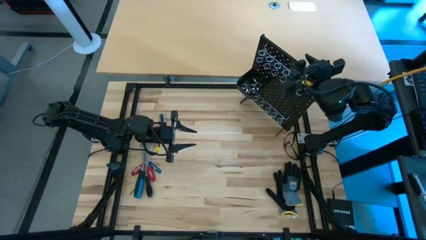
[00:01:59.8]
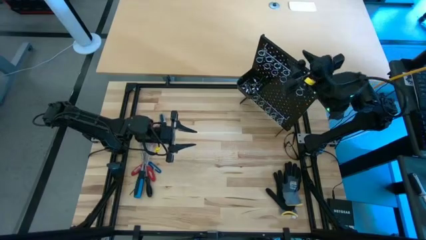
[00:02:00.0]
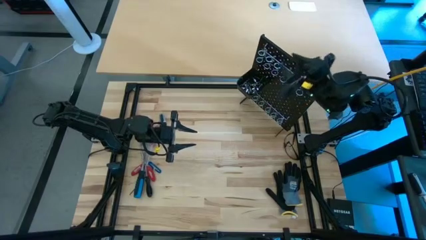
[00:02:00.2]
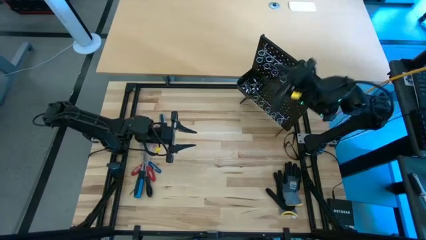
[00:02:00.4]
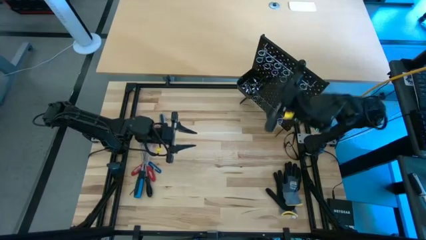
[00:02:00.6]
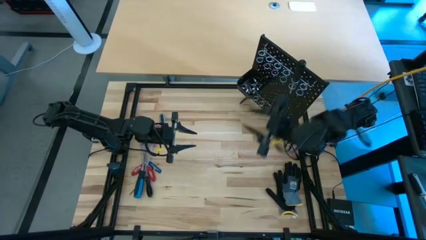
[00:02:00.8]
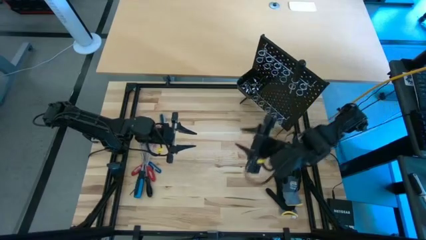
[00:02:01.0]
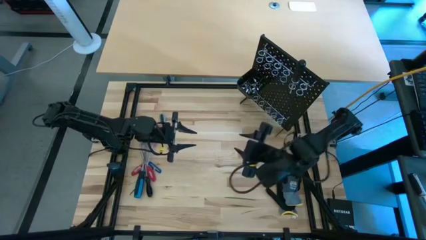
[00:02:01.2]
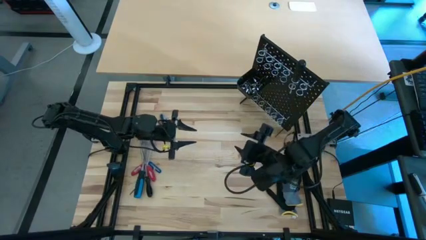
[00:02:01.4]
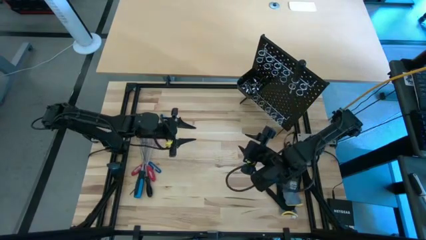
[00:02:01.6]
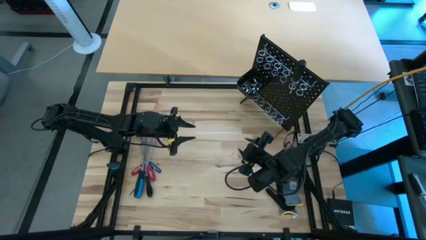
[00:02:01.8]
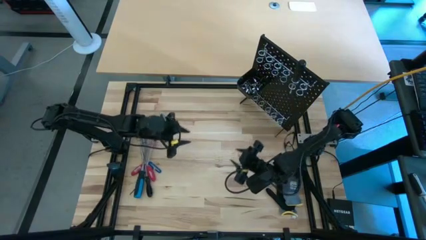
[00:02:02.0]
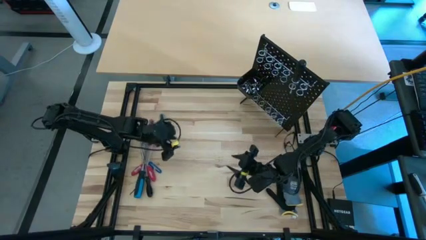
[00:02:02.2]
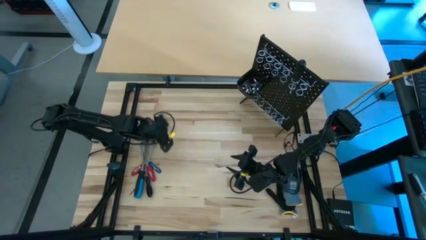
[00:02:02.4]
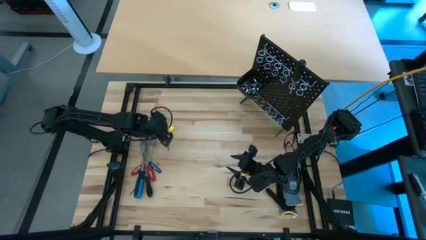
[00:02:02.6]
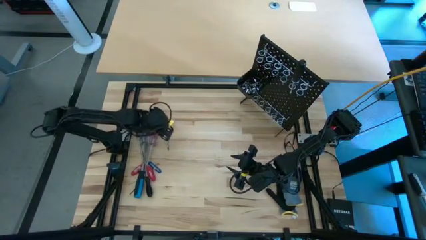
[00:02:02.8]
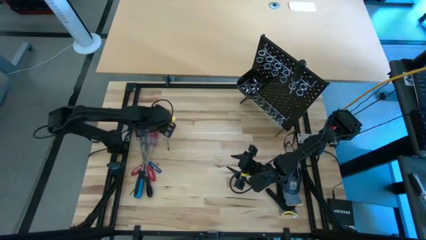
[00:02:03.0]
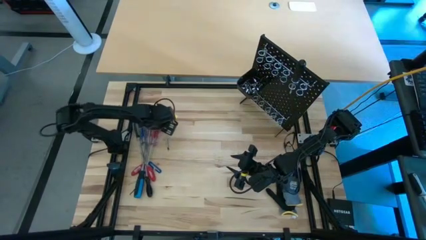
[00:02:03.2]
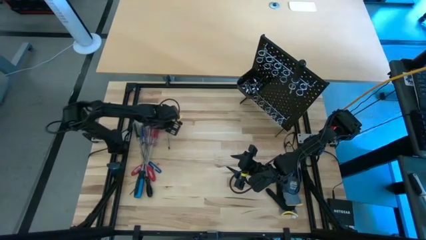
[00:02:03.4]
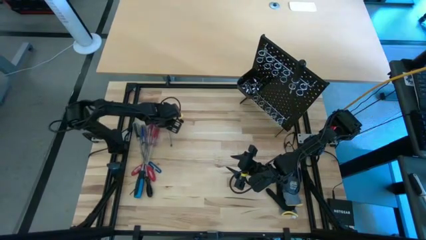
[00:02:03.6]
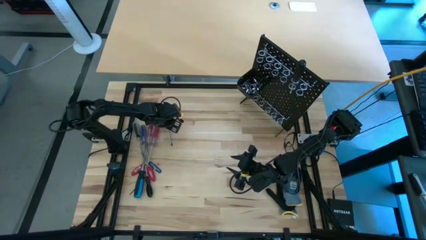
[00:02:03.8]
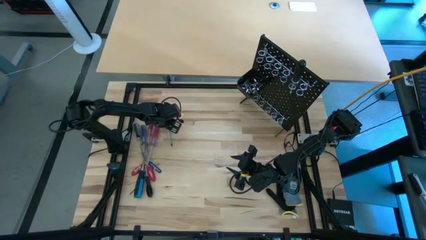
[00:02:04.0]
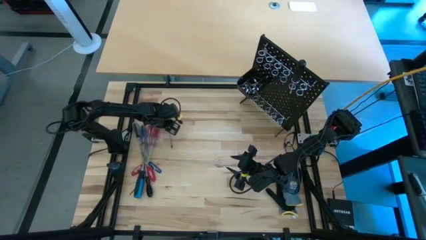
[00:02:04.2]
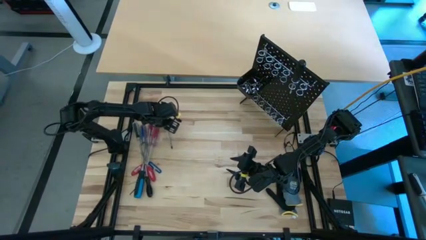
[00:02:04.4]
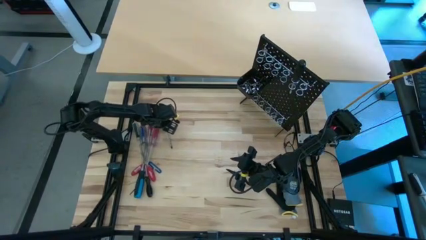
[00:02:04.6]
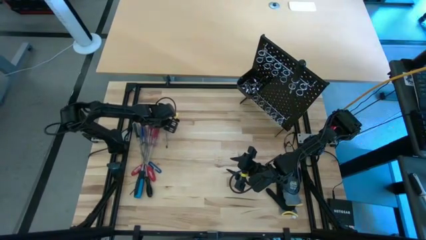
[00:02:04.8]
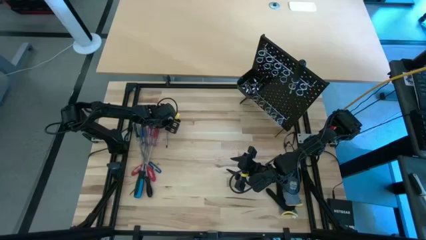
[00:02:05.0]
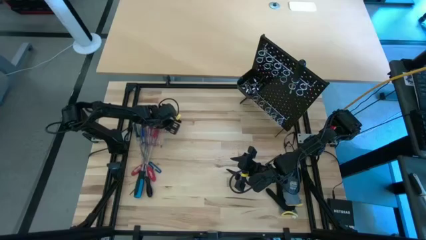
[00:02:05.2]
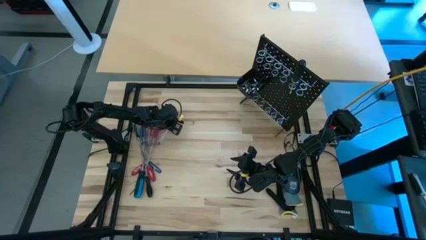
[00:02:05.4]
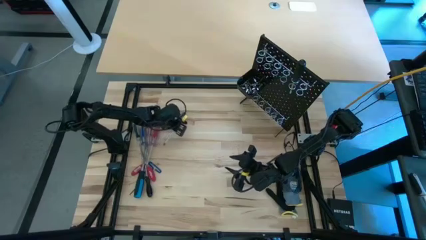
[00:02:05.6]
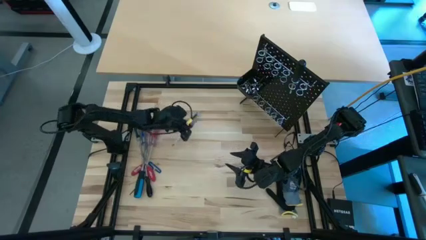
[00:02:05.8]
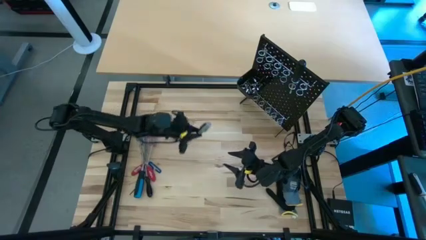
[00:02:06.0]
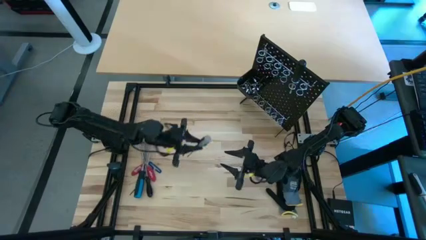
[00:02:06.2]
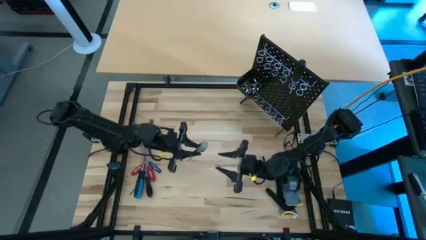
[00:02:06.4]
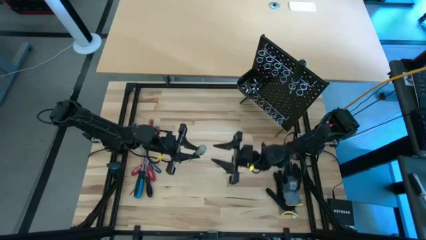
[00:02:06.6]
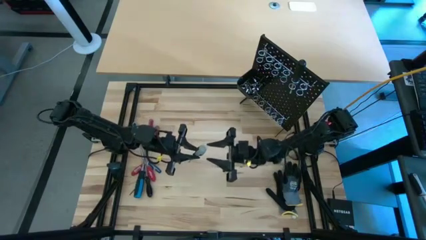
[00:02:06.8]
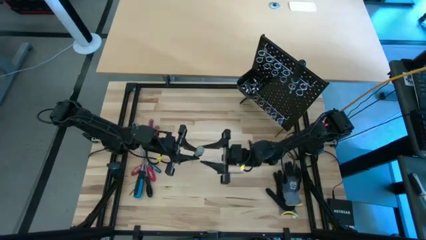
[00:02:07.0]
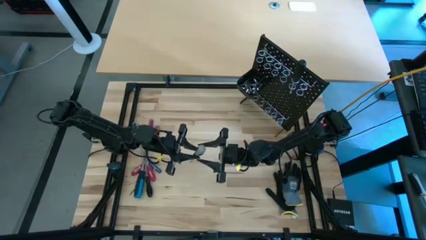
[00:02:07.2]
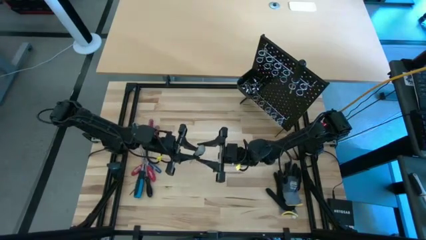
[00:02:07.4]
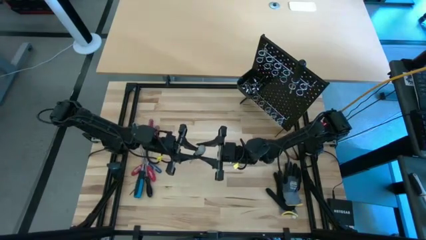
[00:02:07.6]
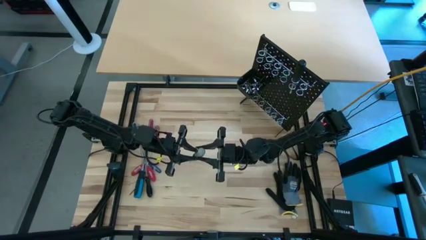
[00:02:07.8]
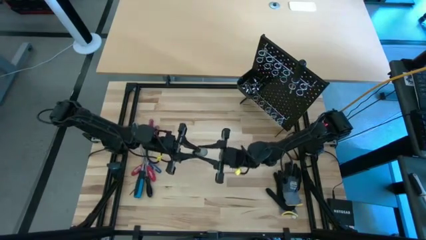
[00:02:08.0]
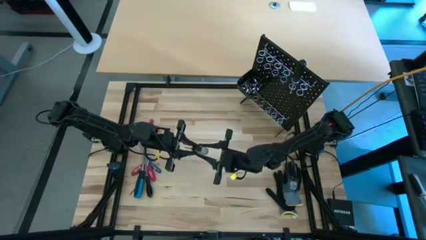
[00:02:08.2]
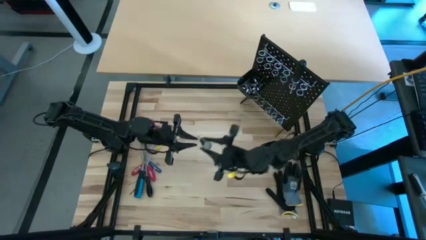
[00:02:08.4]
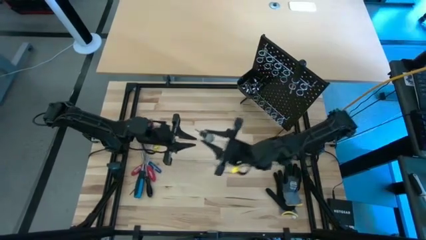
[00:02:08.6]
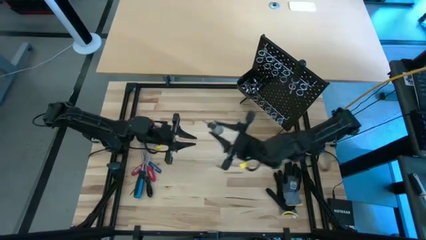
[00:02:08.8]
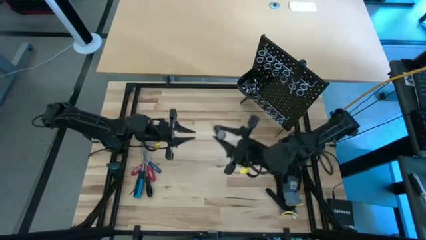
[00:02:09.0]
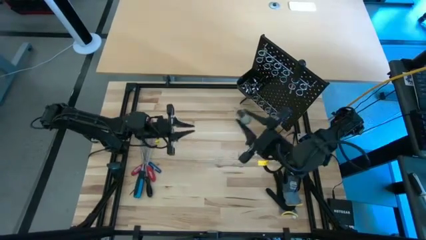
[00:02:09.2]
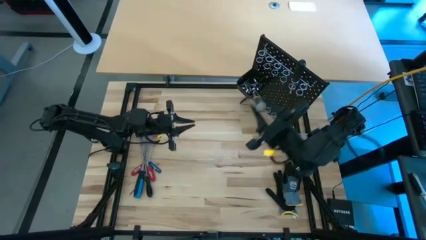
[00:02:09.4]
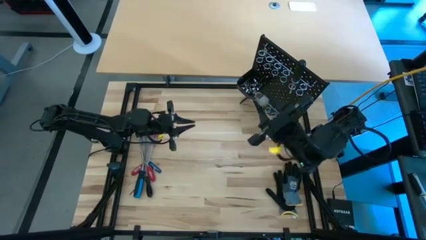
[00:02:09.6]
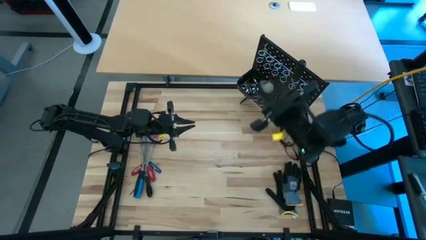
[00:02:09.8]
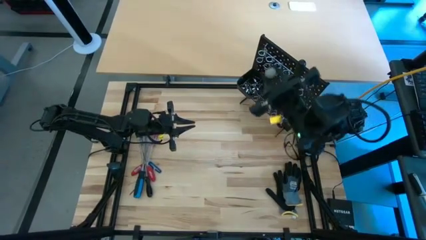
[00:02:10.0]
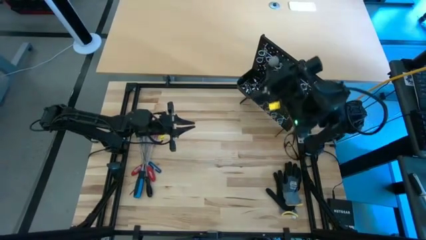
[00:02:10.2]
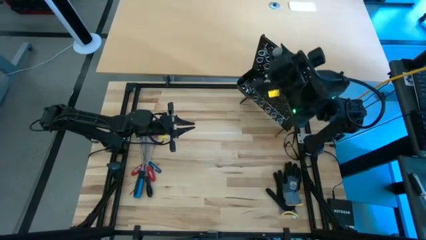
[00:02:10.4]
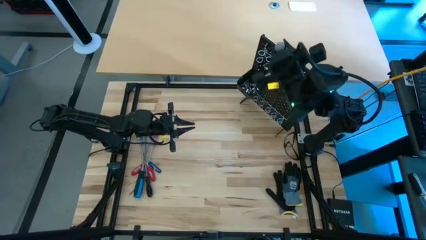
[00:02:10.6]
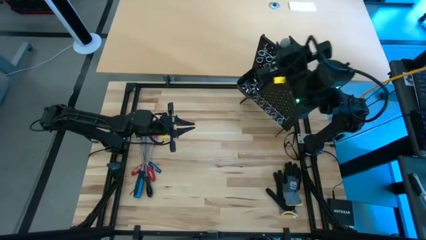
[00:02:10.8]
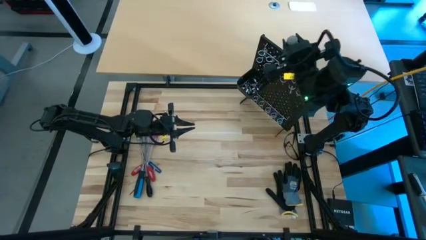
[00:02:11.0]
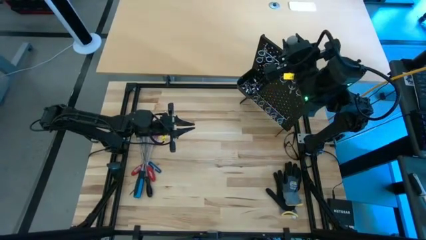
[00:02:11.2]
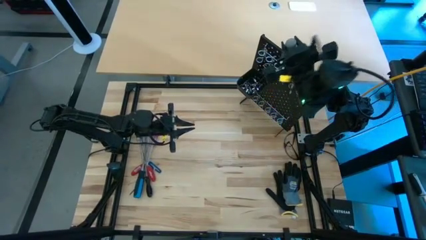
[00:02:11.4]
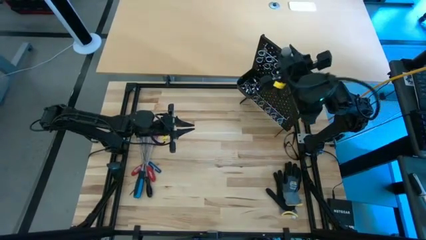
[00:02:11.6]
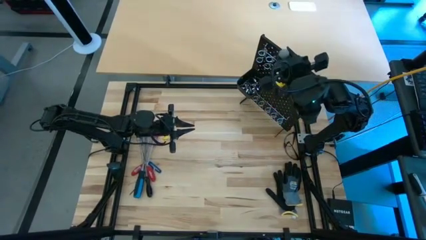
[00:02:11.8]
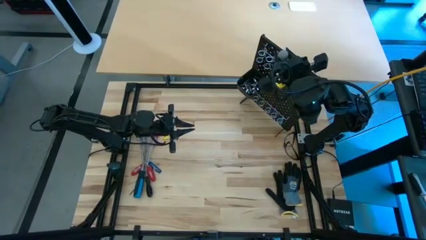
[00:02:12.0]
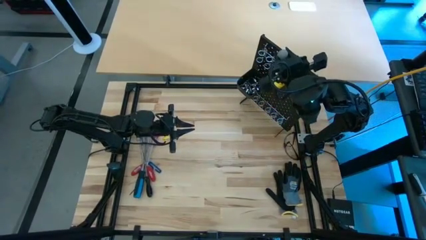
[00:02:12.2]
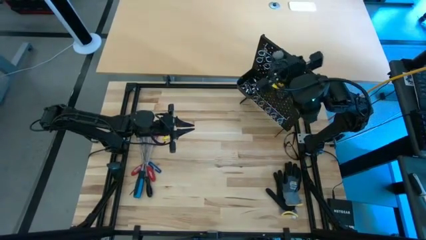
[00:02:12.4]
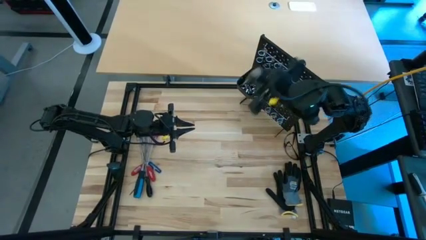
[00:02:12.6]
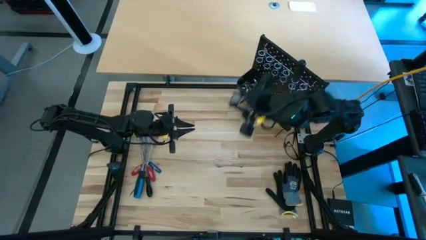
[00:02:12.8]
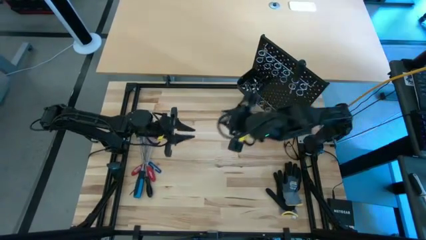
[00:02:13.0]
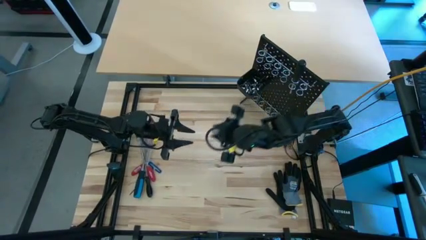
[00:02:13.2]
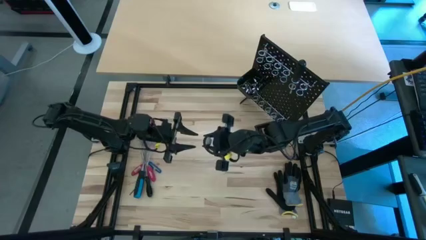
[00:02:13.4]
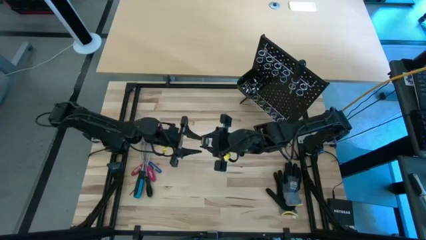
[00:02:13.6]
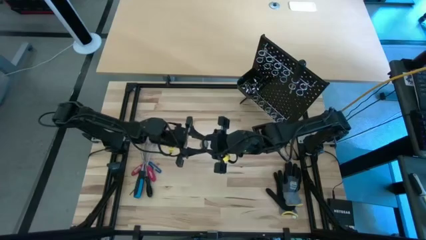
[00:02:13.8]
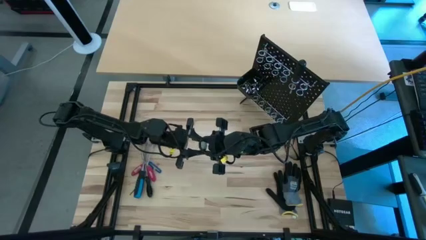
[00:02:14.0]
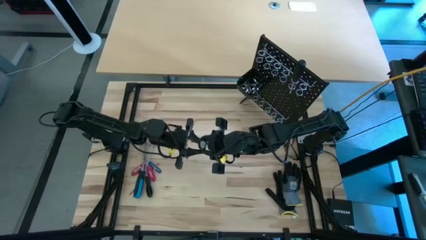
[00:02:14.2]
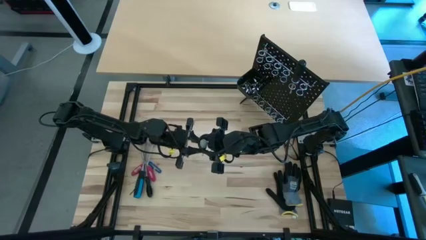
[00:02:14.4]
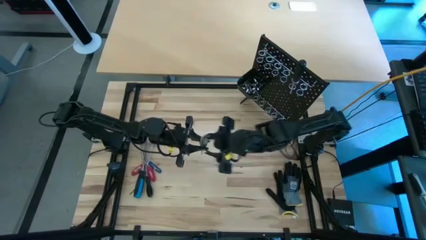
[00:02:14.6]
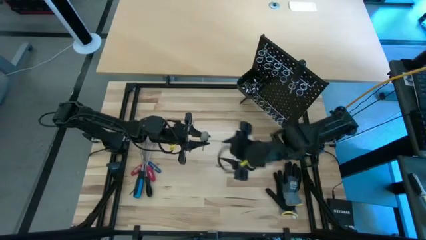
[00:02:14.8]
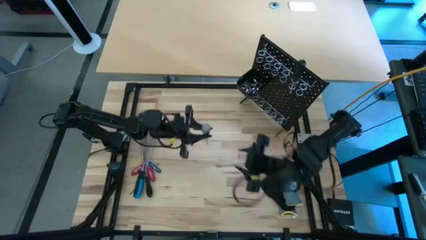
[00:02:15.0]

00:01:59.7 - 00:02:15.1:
Task: Hang tools onto peg board
Hang the right gray screwdriver on the black pegboard
